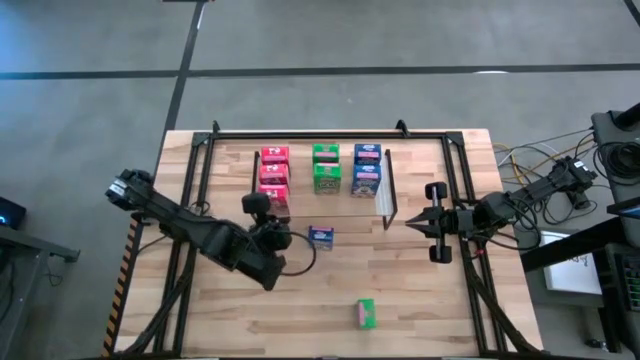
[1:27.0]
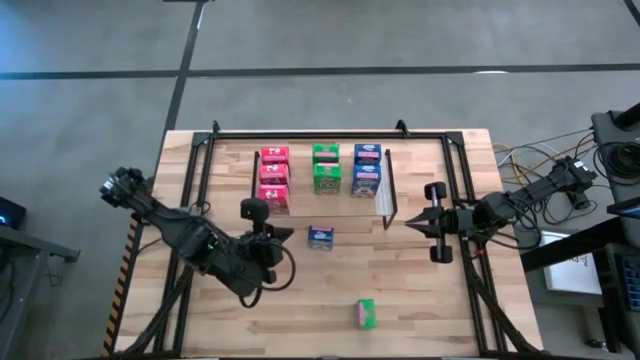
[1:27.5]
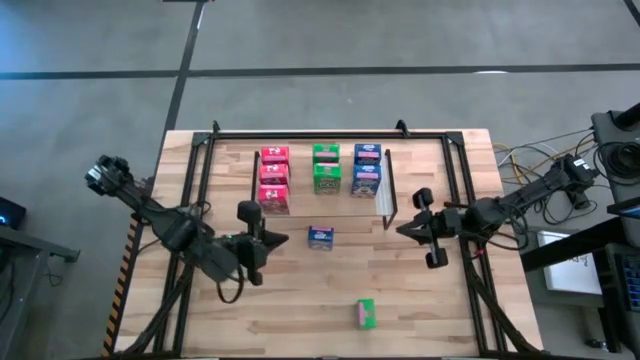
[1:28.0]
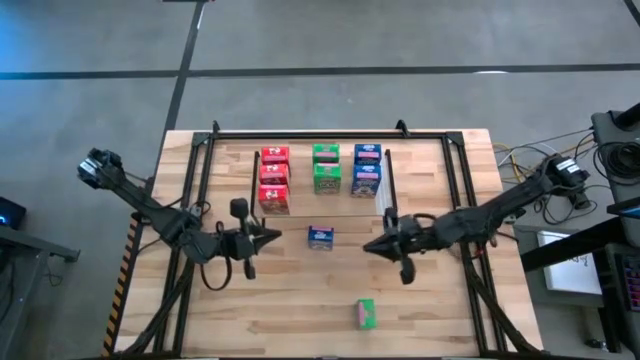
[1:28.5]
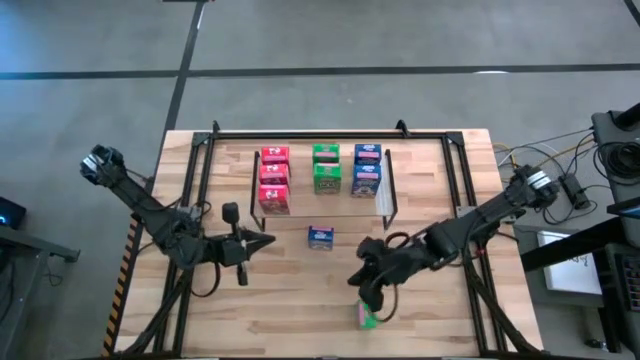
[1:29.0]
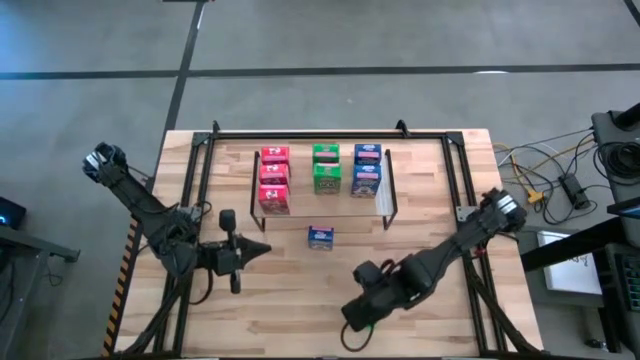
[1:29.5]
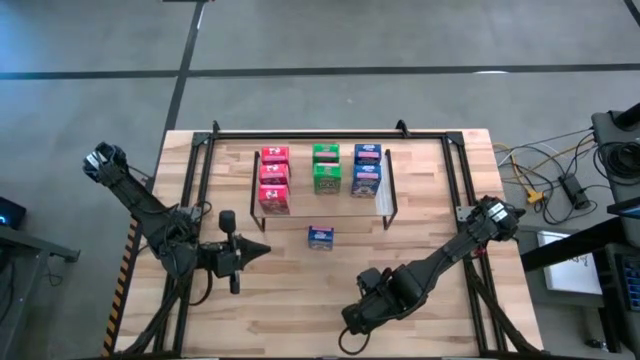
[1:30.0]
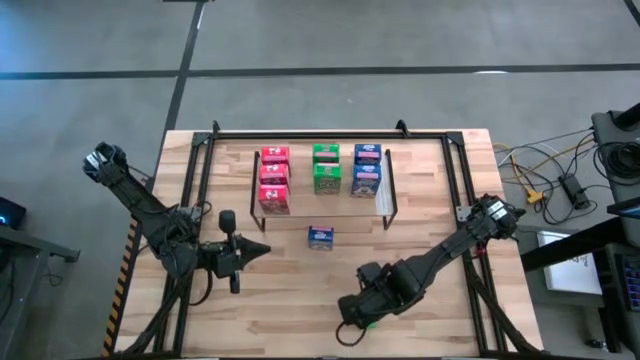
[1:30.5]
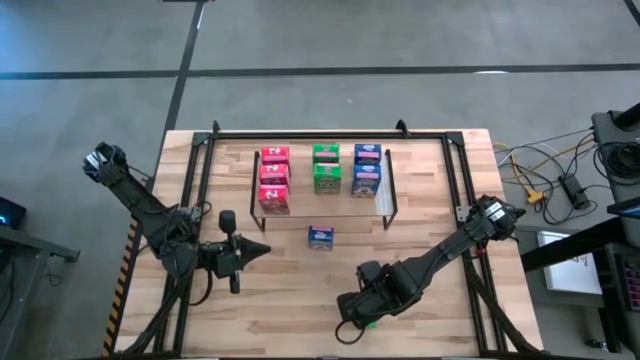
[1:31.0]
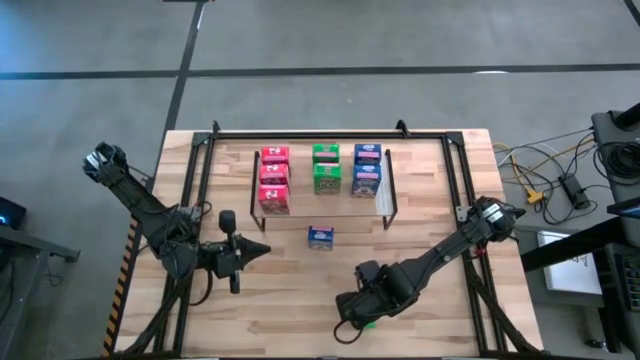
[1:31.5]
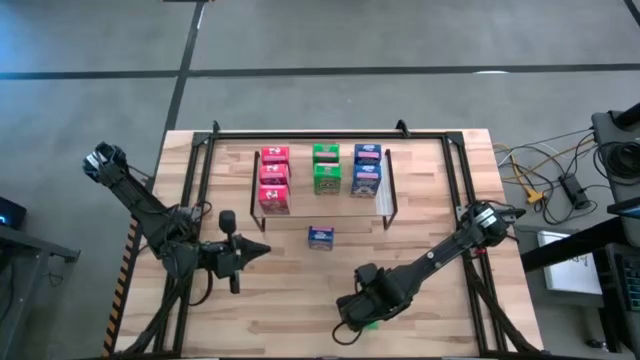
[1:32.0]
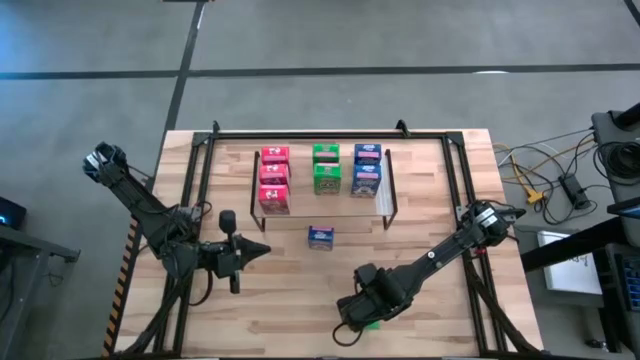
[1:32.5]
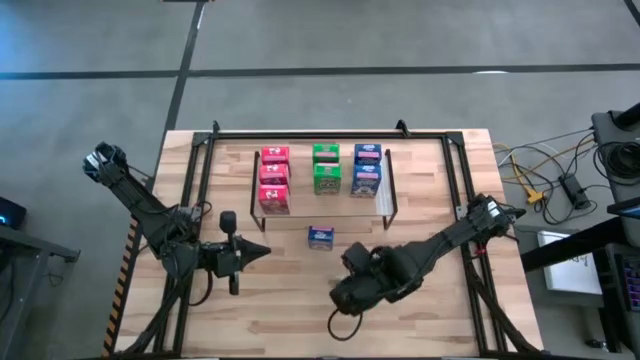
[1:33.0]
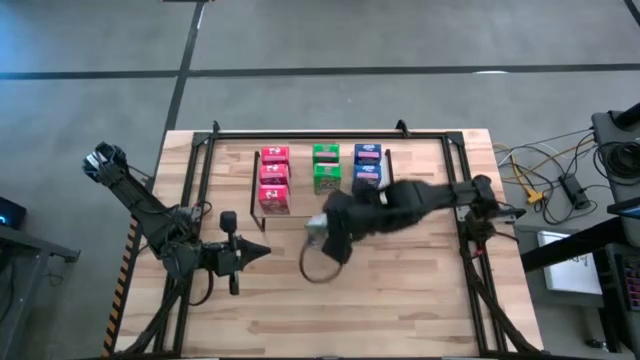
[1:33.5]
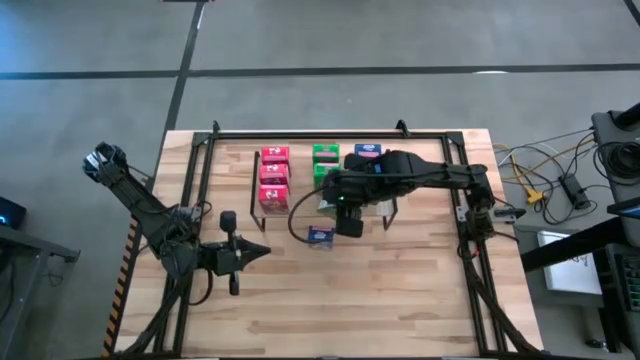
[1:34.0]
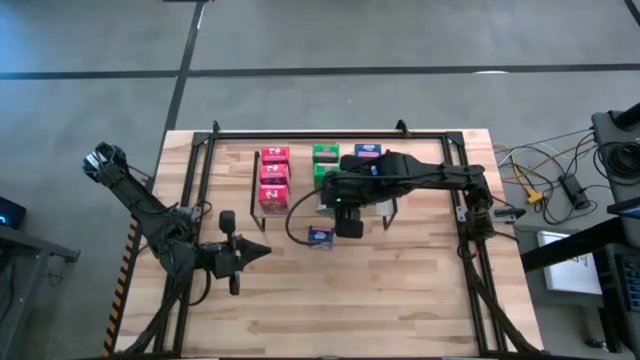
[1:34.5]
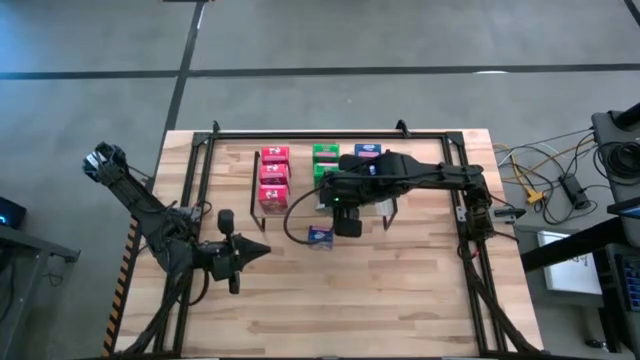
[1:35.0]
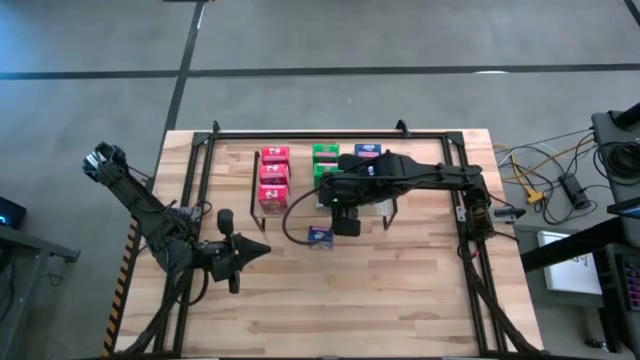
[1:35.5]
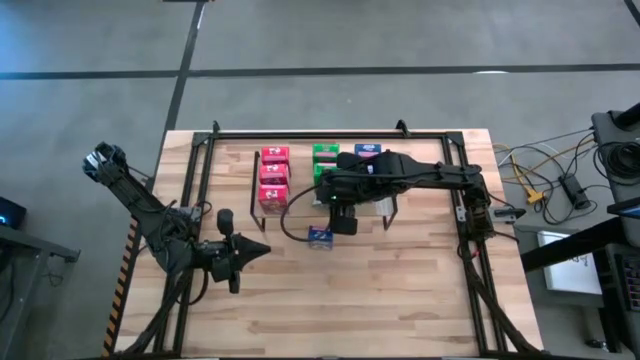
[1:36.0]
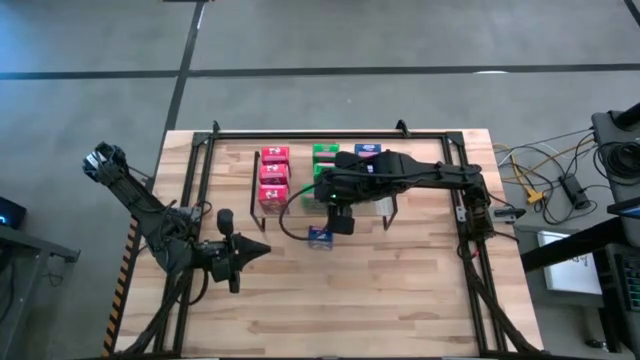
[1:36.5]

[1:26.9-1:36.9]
Task: Stack cereal on shelf
Put the bottom green cereal box on the shelf, aligned with the other green cereal boxes

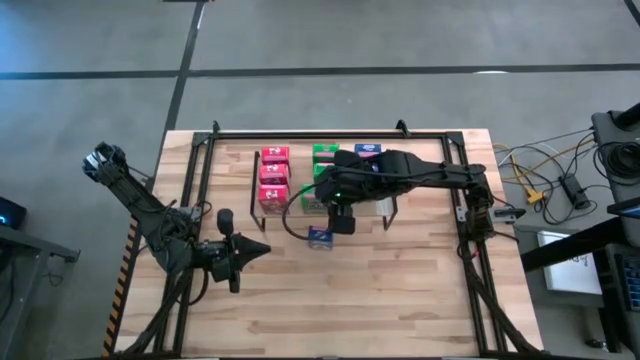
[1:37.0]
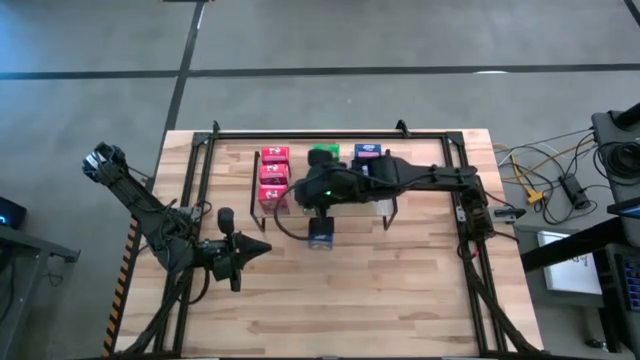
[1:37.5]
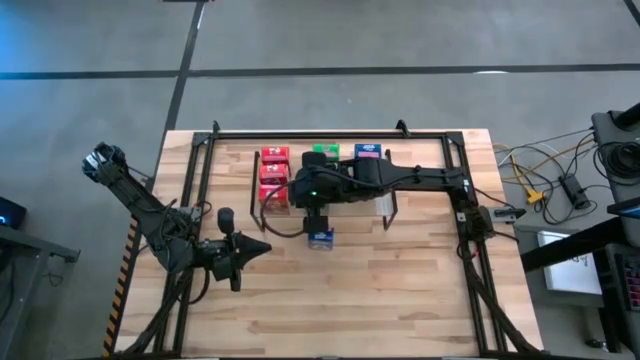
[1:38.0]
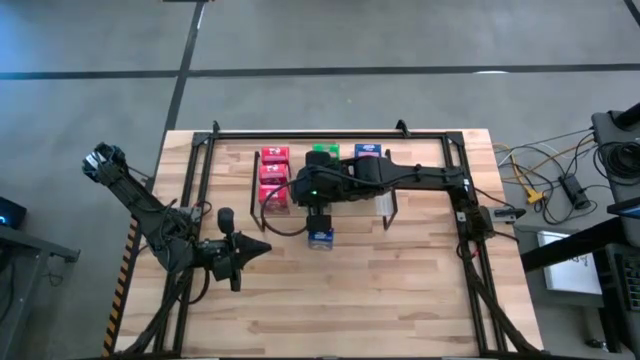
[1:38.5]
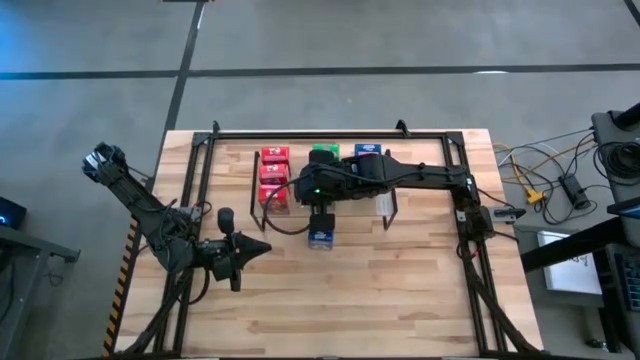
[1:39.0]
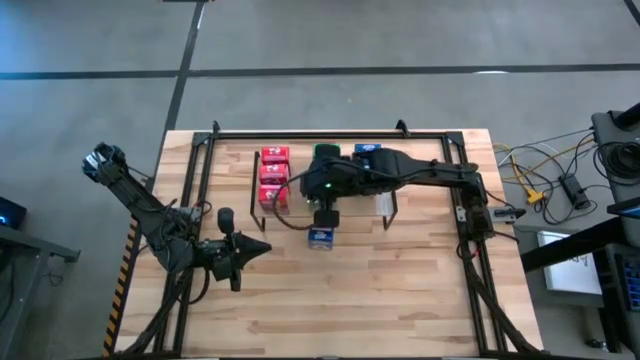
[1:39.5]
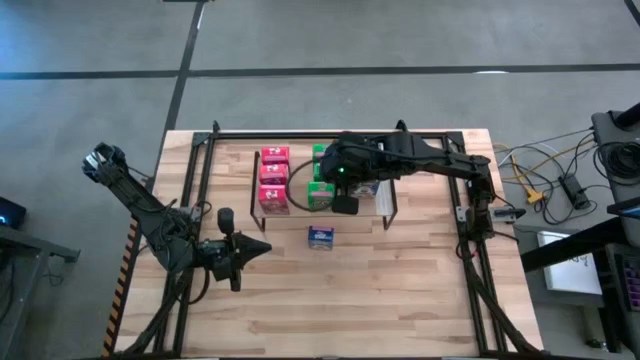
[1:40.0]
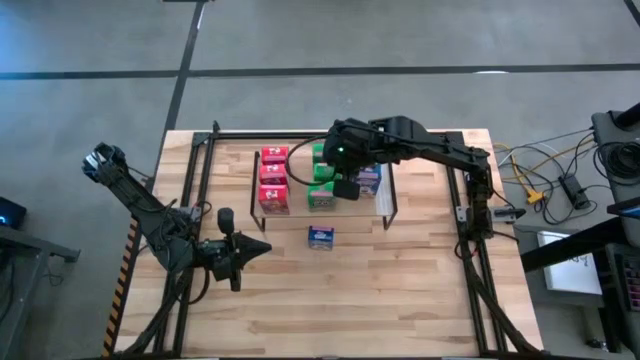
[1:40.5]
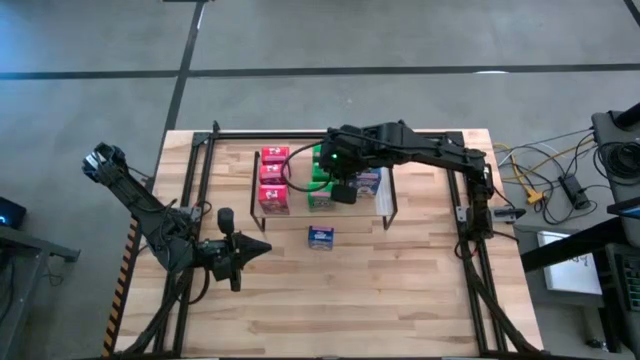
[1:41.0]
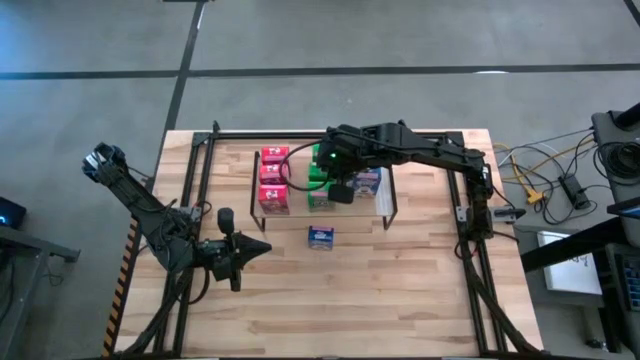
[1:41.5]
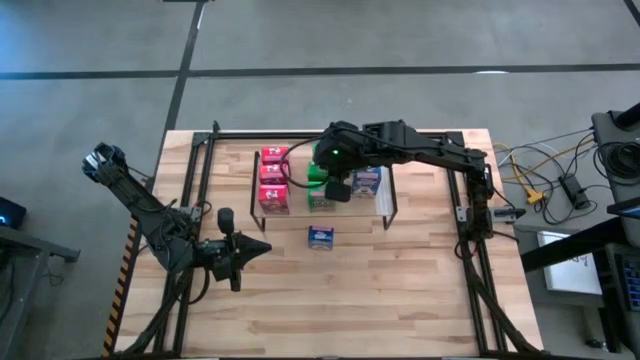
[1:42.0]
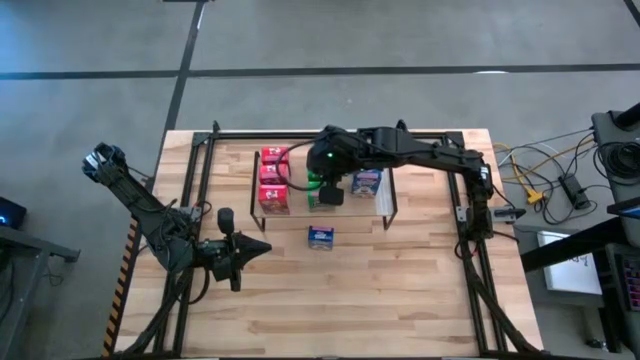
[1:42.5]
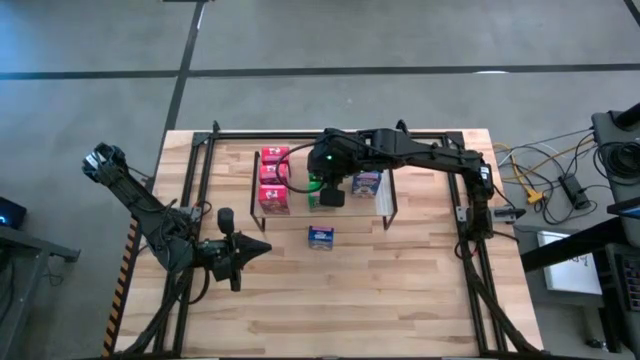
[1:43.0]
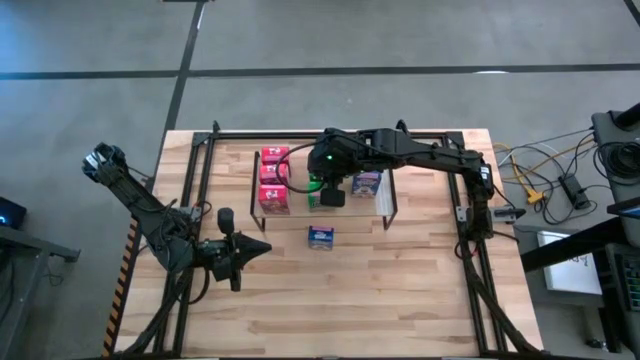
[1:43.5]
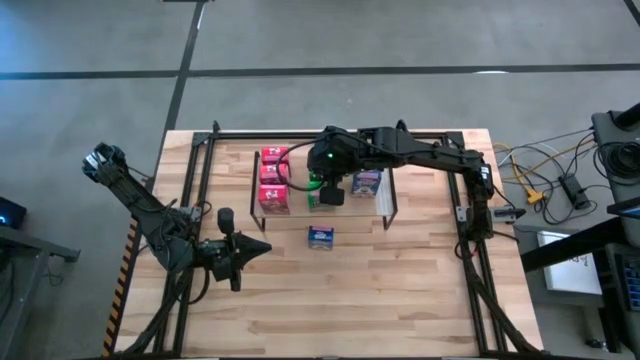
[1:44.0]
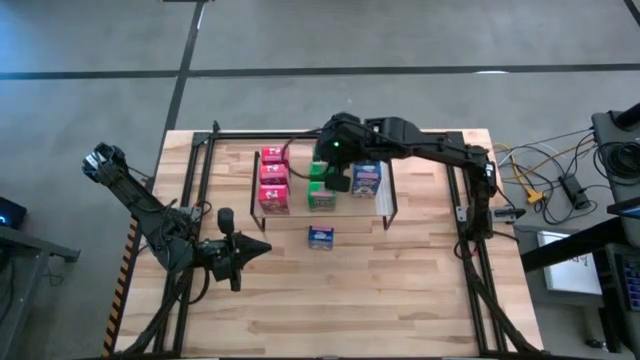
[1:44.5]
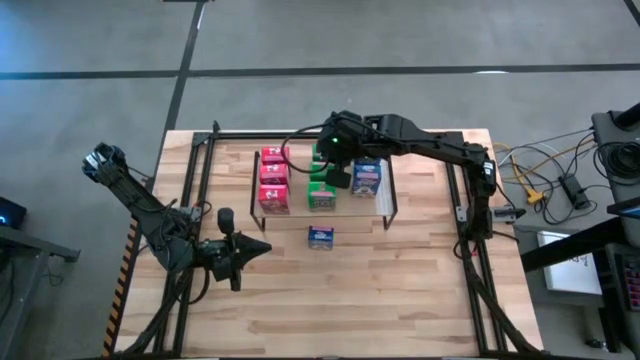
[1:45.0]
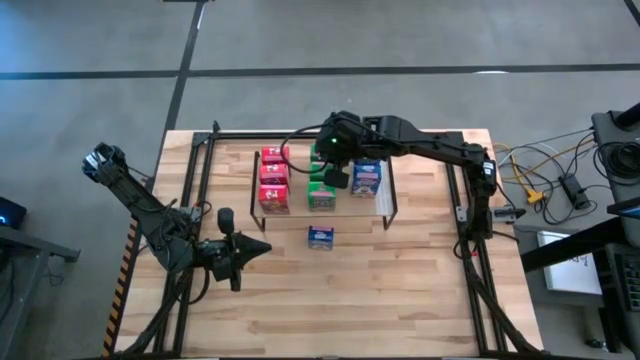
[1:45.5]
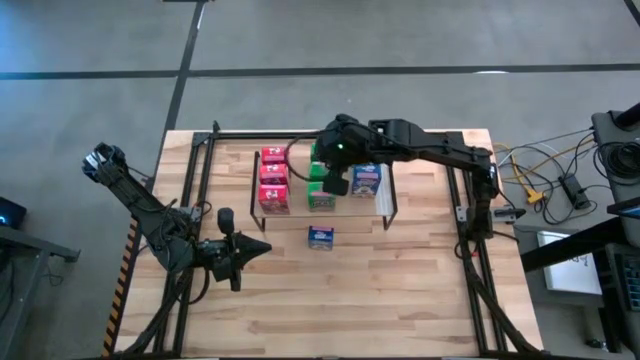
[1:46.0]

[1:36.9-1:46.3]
Adjust the green cereal boxes on the shelf

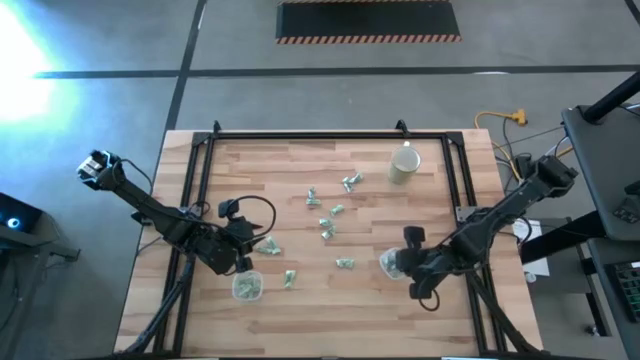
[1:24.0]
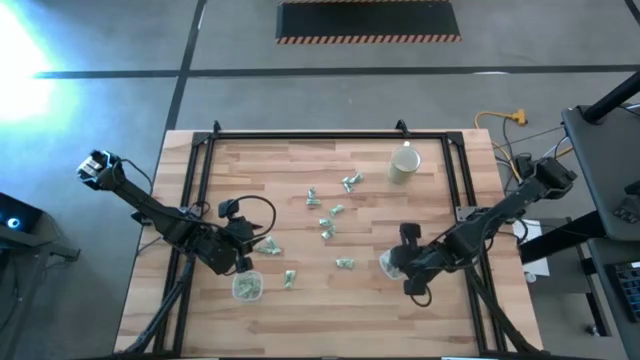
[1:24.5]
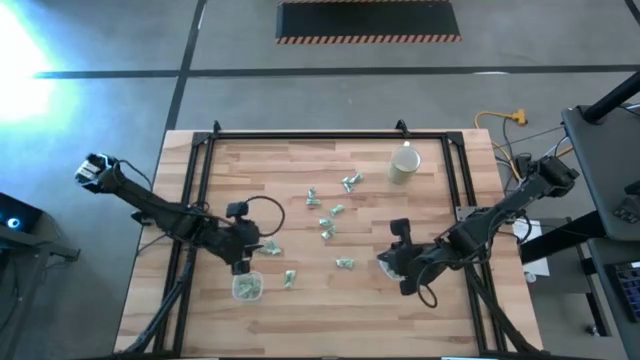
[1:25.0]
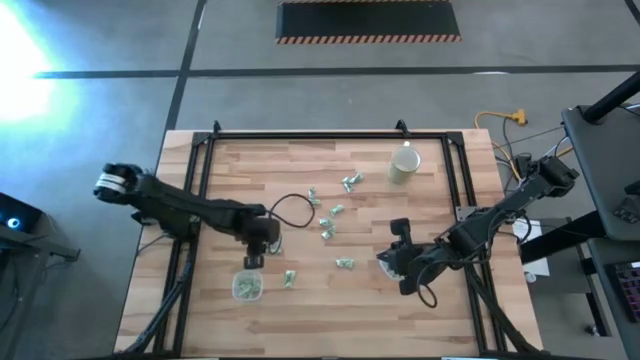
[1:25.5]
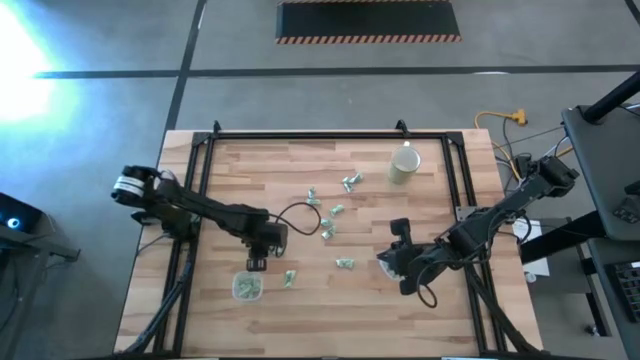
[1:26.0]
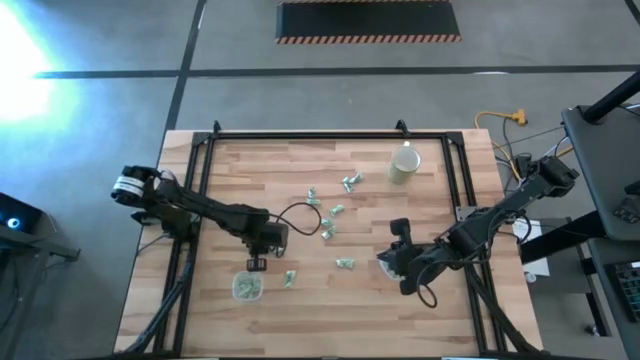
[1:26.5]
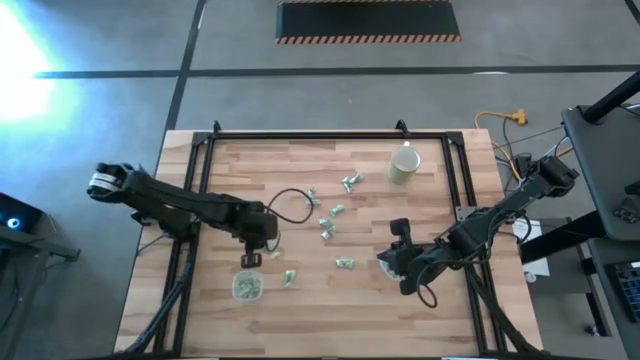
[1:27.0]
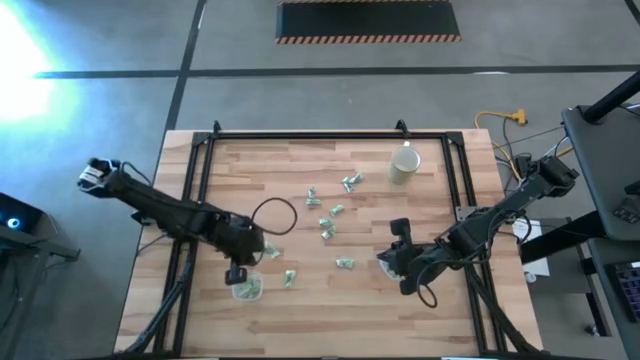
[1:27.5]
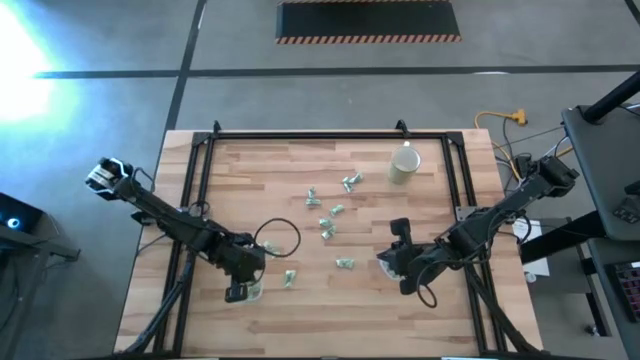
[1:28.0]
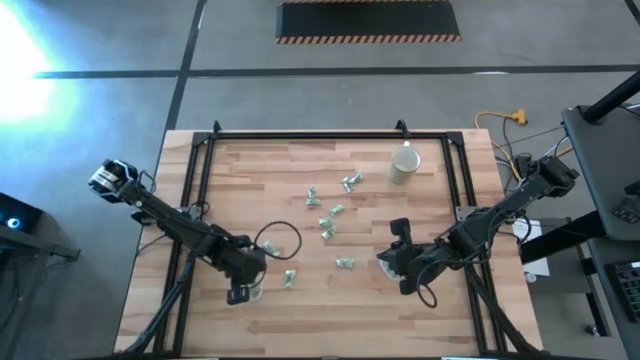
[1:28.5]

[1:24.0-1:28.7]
Task: Pick and place Stevia / Truvia into bins
Put the stevia packet into the left transparent container
